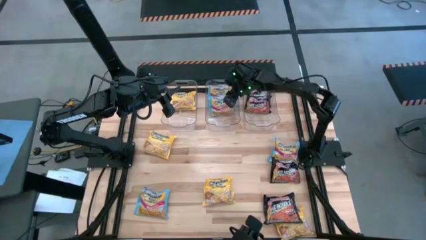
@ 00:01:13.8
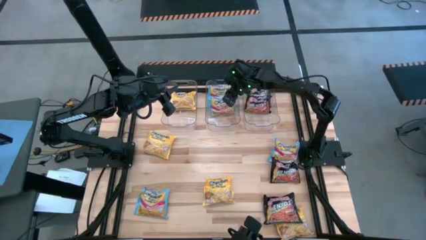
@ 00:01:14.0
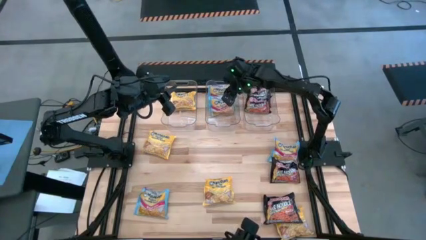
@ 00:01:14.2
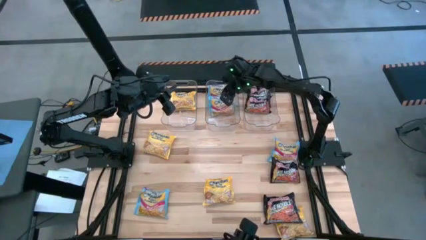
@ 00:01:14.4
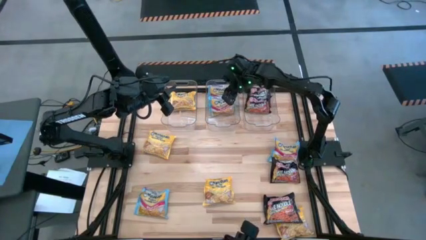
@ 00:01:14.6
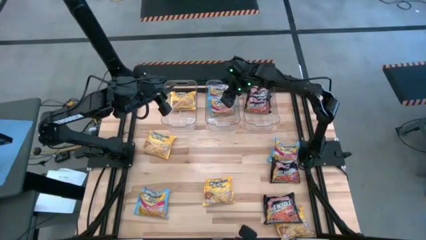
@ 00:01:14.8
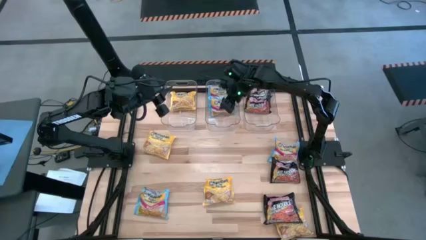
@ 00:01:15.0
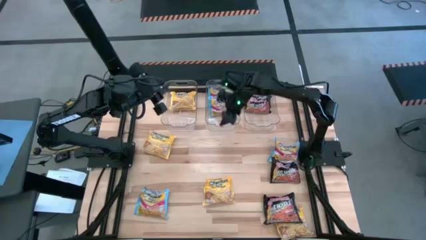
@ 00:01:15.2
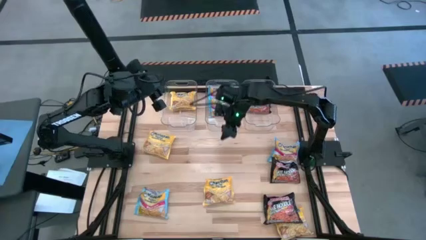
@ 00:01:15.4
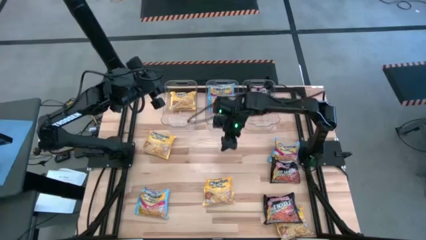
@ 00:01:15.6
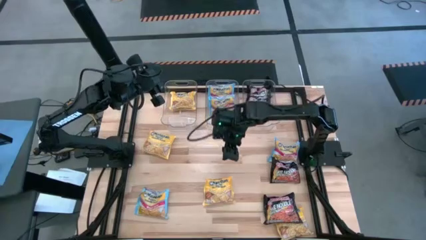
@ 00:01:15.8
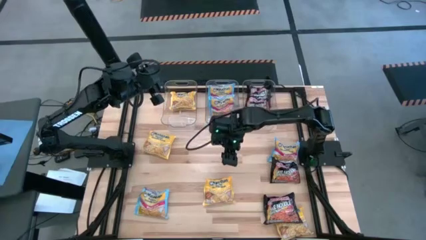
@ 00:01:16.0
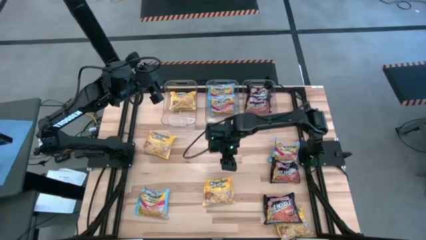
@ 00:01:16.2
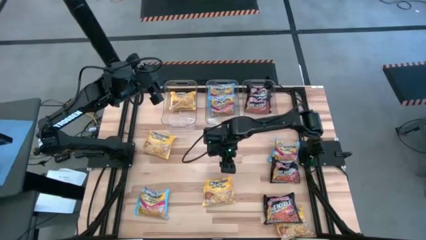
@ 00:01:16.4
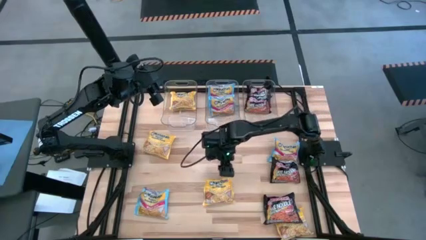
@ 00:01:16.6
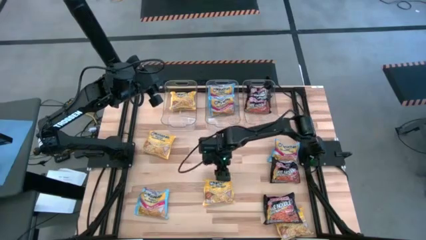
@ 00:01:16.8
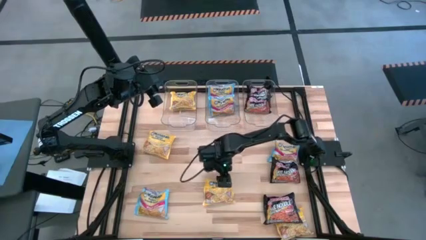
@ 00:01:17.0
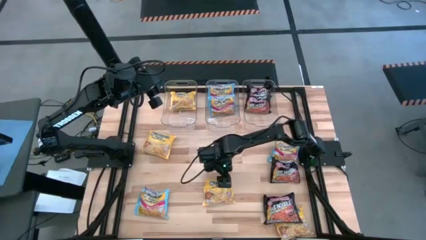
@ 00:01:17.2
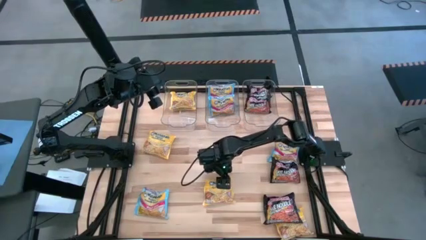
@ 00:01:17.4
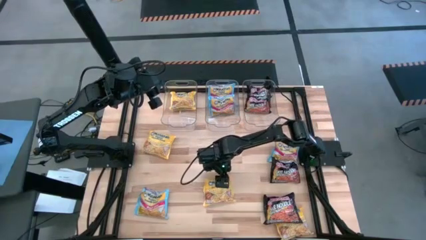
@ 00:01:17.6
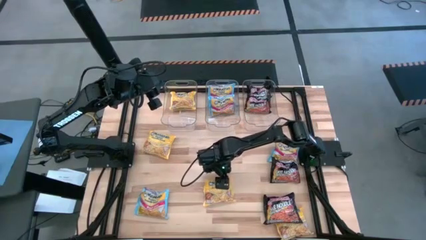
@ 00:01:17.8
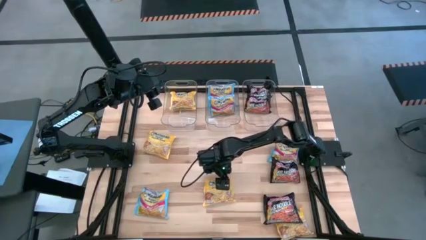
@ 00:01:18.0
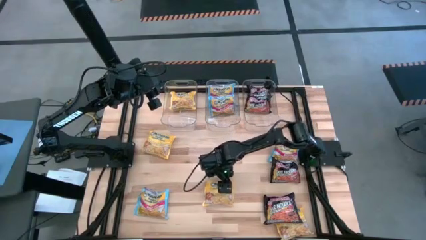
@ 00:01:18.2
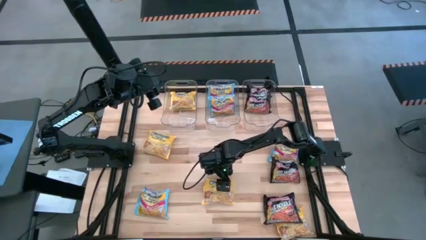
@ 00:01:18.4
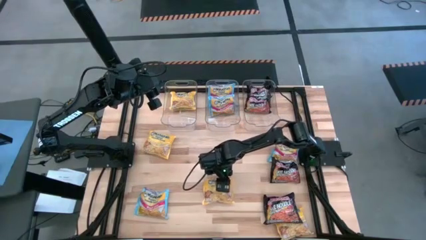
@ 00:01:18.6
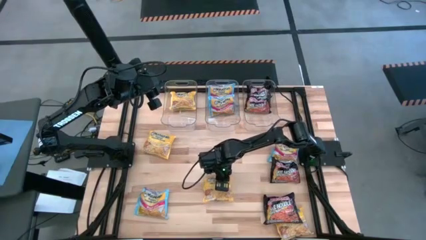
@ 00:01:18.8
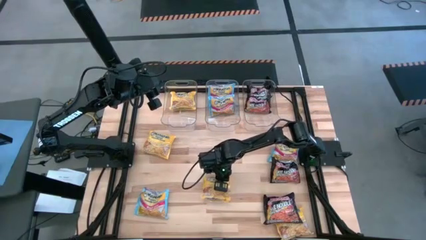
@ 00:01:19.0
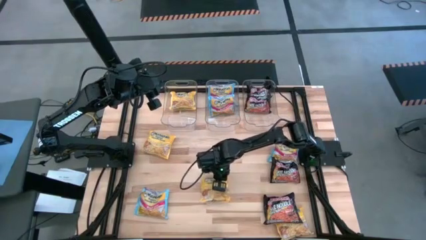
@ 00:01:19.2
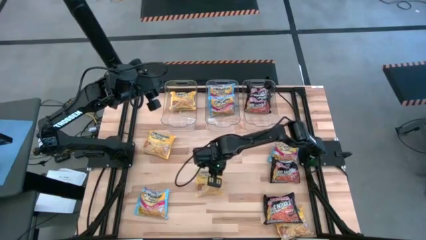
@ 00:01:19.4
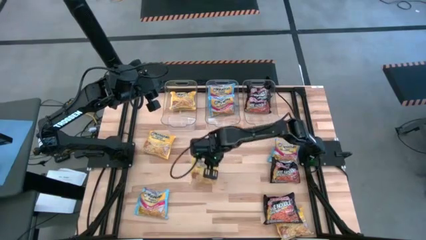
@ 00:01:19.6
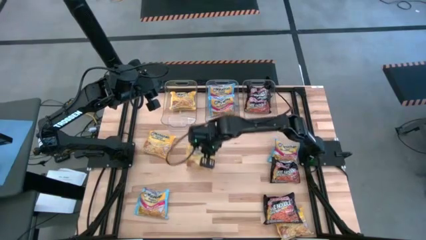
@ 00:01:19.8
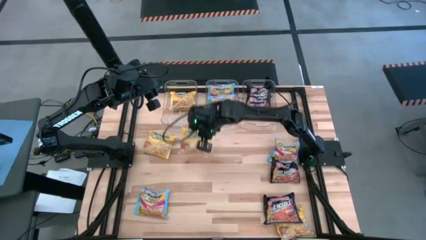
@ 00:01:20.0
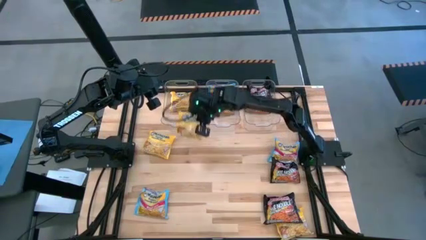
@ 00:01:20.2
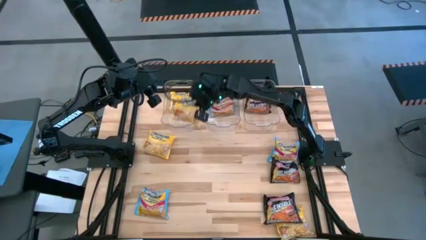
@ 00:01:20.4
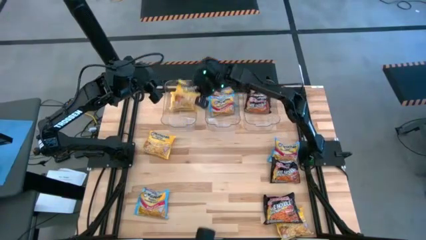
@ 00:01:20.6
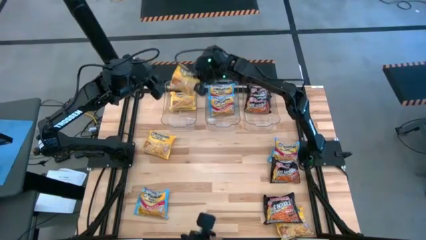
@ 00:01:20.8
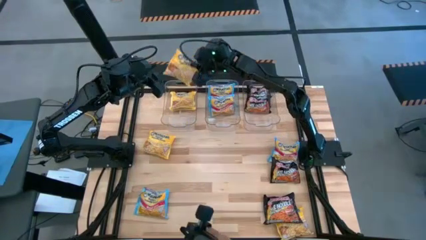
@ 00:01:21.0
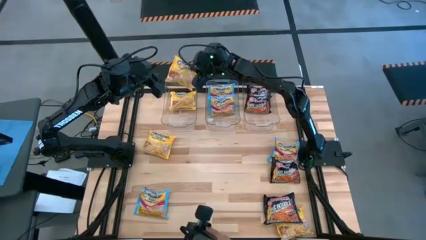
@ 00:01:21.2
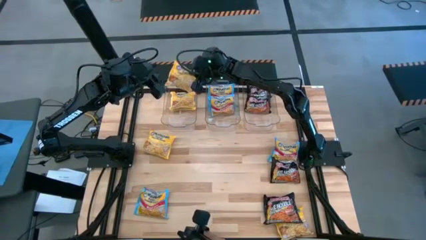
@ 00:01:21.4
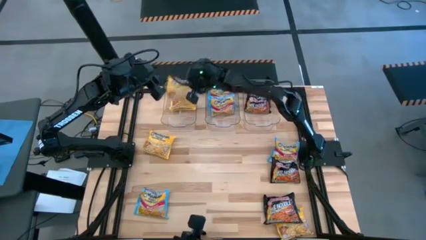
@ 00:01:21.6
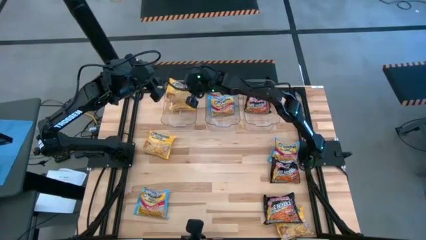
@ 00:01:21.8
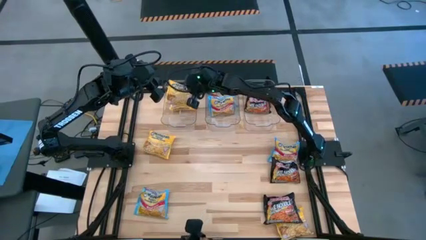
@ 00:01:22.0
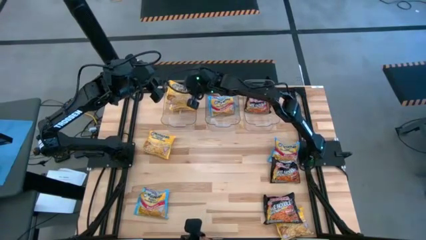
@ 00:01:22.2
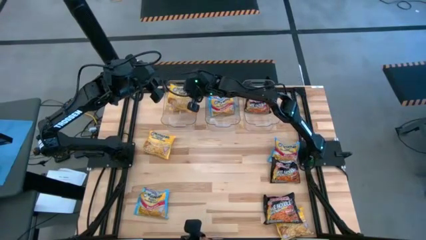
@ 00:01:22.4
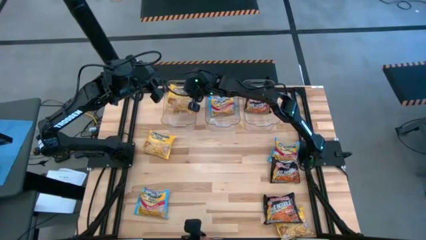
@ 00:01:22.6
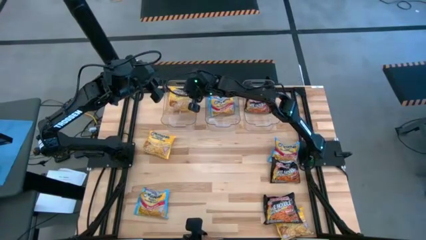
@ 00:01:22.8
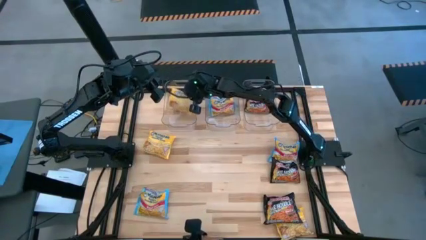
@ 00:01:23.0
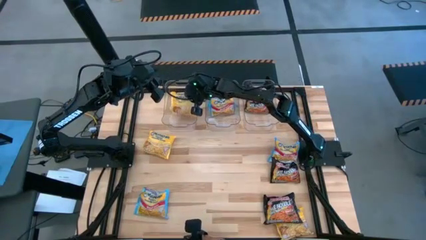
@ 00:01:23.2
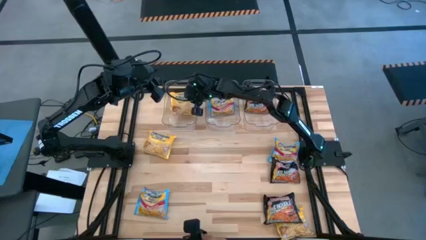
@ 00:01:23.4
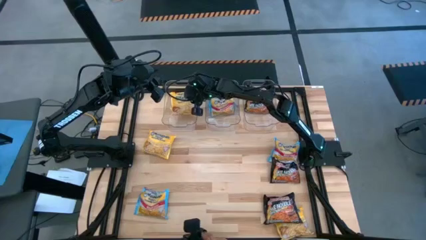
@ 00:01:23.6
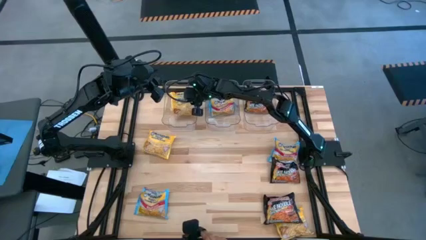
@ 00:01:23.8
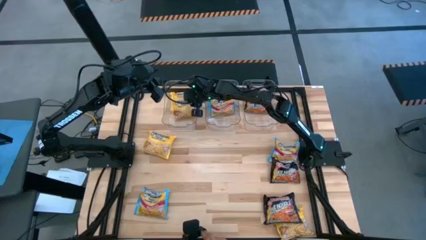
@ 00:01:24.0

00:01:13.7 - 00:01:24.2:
Task: Sort Maruchan noodles
Put the yellow noodle pack into the left transparent bin

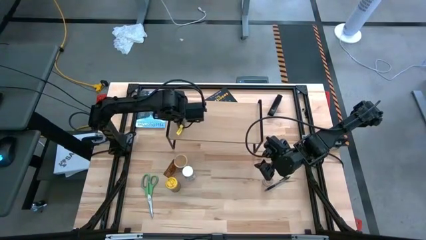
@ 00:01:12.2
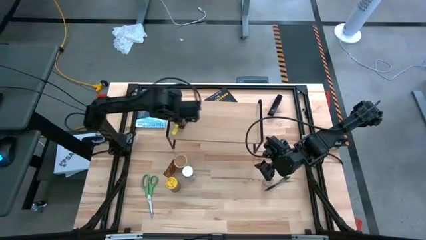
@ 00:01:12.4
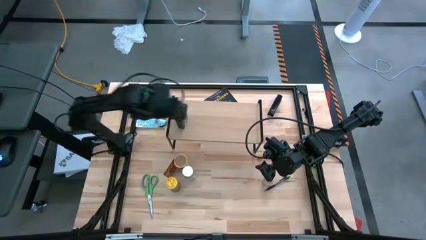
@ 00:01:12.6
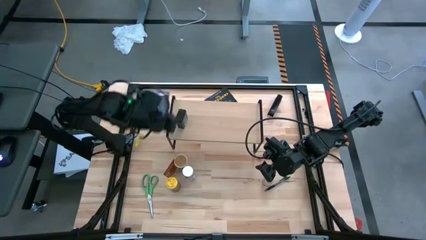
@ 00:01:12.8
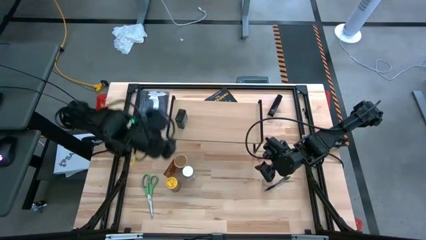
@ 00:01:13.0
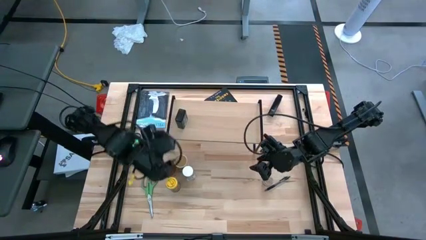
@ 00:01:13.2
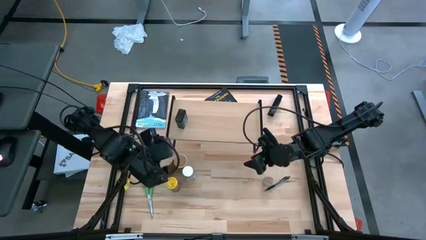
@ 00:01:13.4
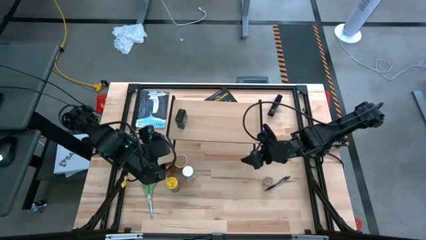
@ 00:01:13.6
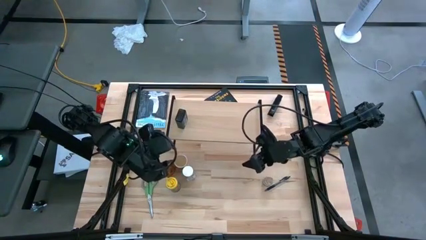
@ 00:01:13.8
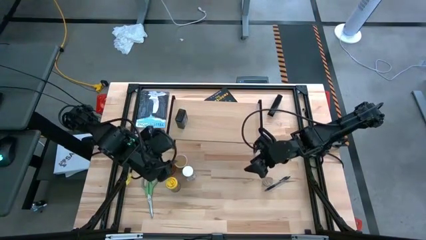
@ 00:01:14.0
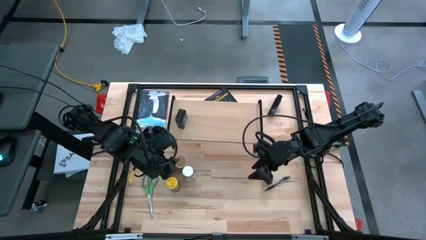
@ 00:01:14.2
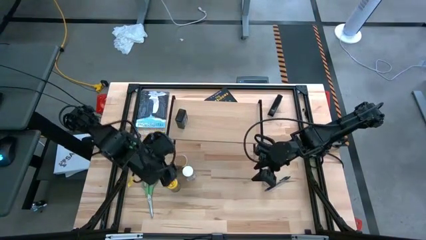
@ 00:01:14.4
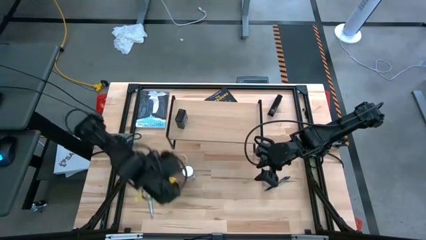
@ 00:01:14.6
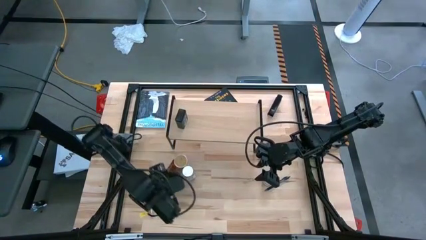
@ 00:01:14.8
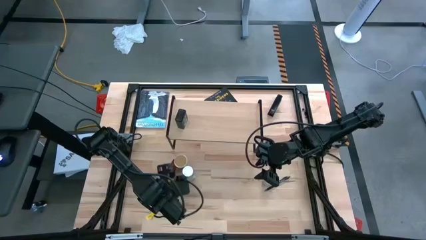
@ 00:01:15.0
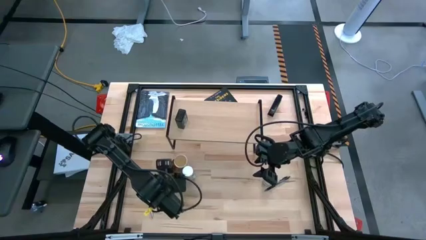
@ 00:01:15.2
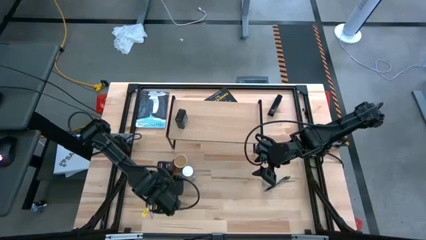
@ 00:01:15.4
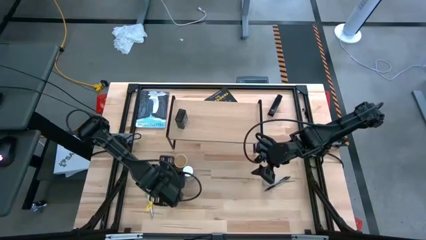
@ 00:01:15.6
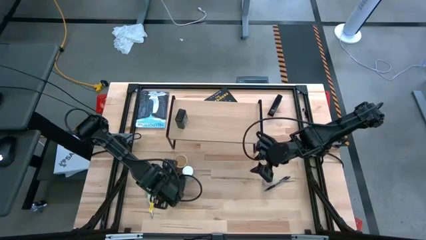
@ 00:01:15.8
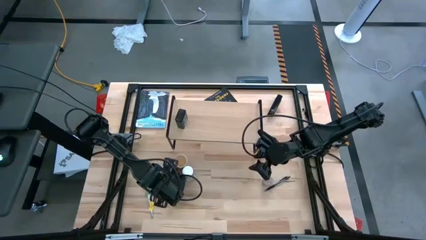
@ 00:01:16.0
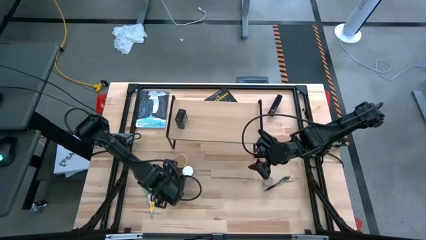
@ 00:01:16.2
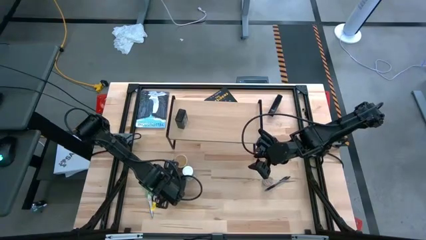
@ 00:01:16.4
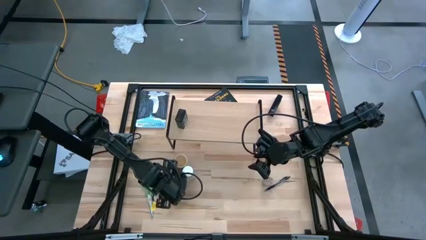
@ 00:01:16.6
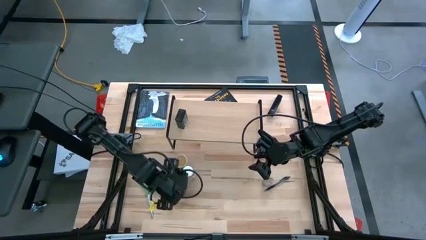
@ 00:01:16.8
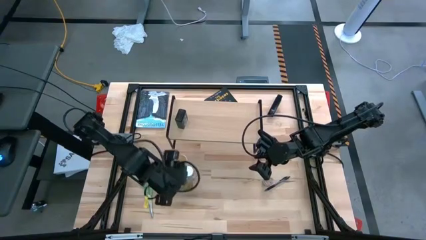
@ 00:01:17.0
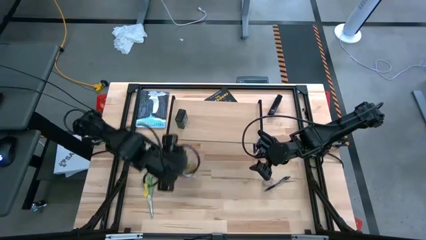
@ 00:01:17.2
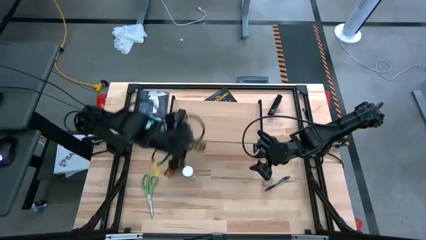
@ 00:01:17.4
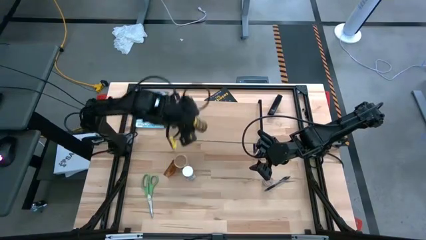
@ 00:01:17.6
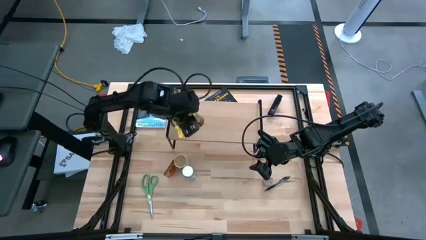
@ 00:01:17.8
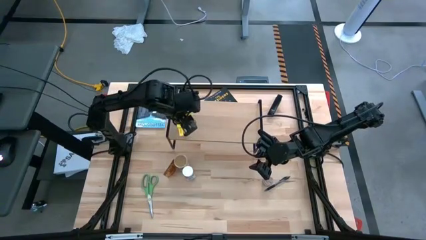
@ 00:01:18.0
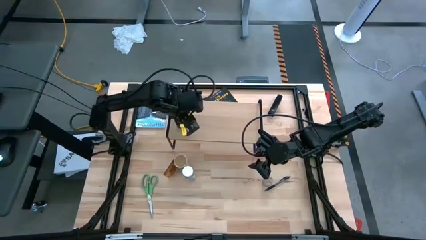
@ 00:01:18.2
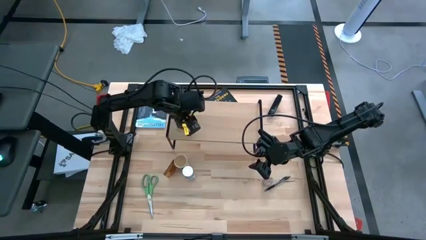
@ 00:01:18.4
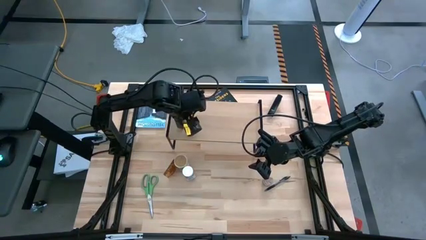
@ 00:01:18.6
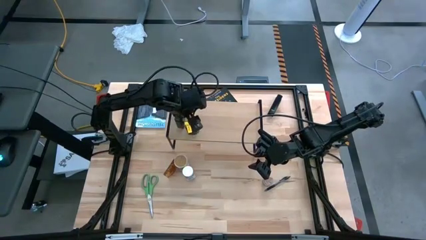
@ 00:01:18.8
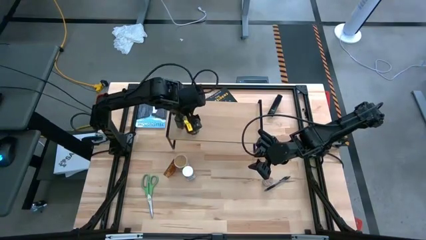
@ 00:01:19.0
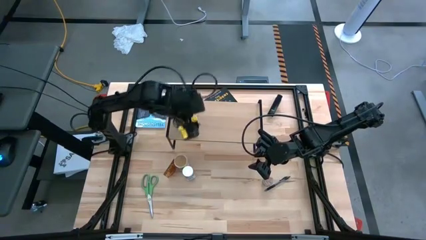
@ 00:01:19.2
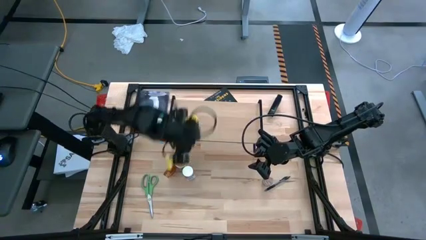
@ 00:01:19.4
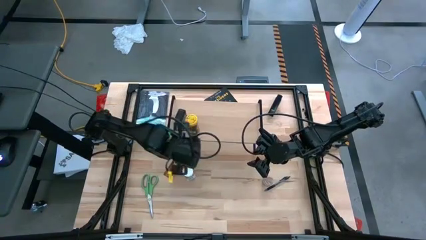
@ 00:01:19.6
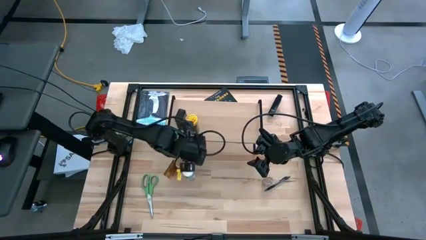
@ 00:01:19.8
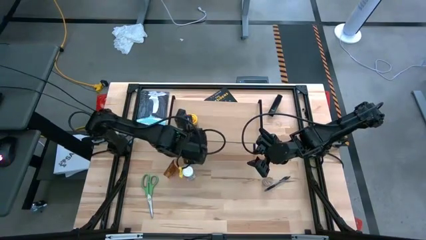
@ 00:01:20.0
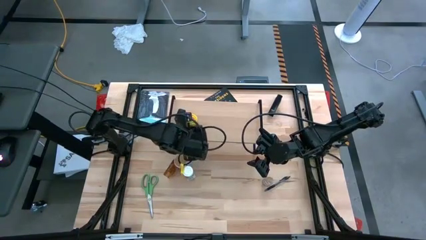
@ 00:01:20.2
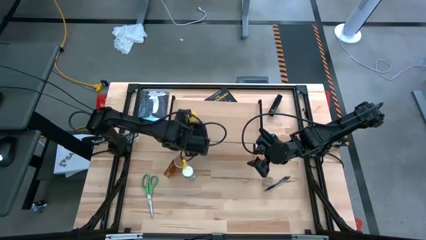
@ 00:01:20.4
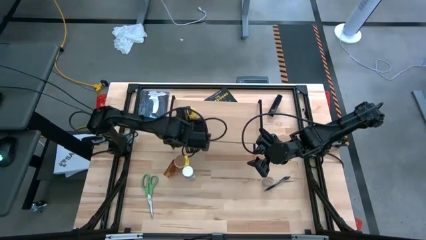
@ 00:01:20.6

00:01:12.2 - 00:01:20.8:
Task: Shelf spices
Put the yellow seasoning bottle on the shelf
